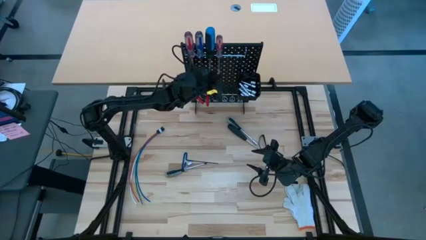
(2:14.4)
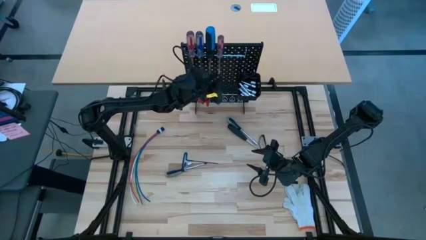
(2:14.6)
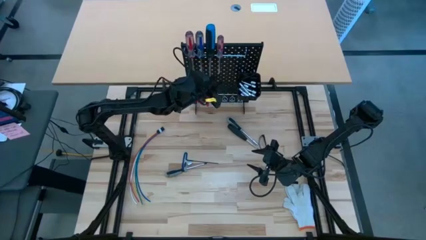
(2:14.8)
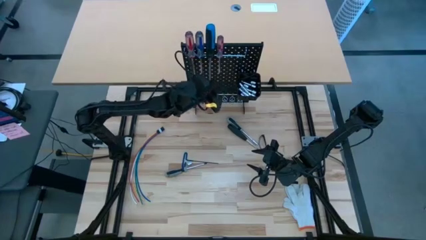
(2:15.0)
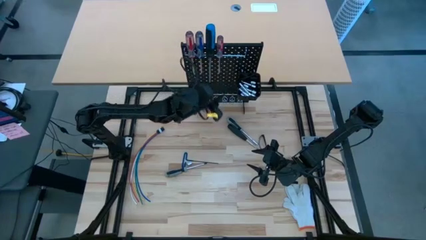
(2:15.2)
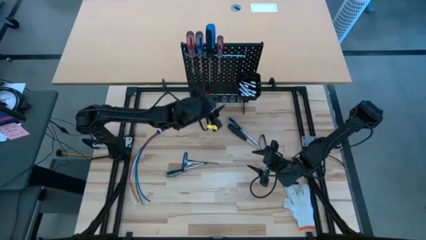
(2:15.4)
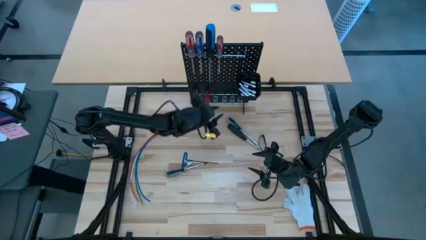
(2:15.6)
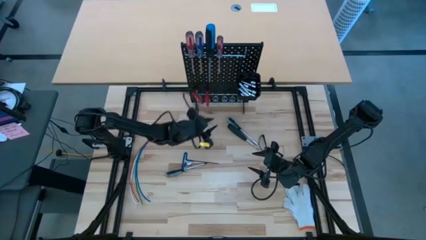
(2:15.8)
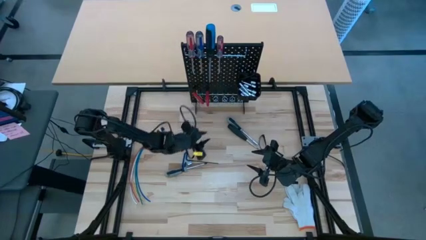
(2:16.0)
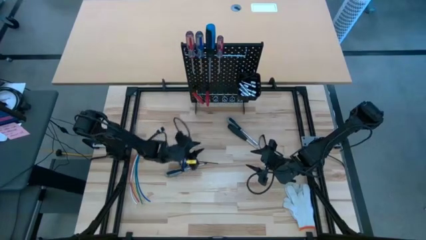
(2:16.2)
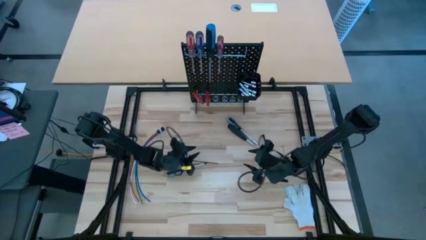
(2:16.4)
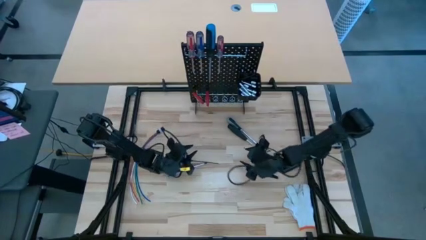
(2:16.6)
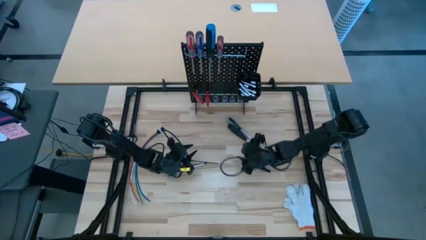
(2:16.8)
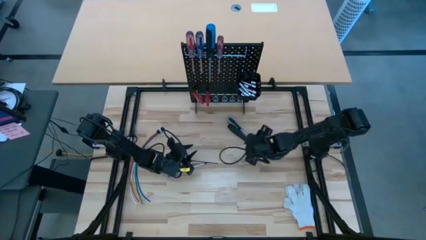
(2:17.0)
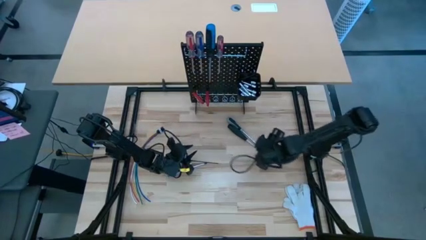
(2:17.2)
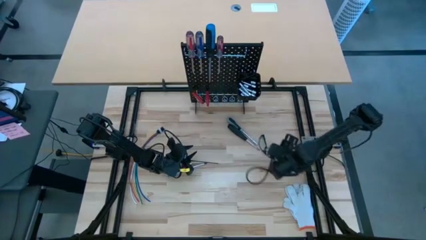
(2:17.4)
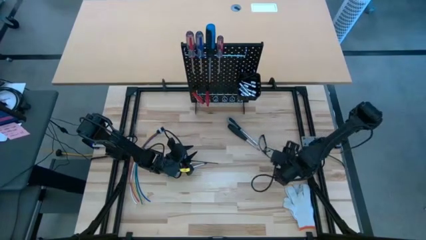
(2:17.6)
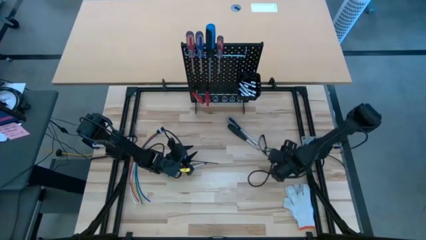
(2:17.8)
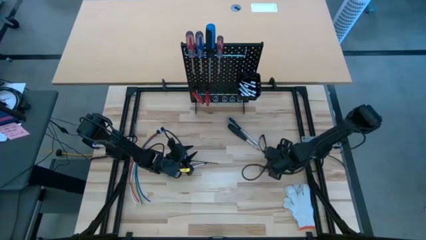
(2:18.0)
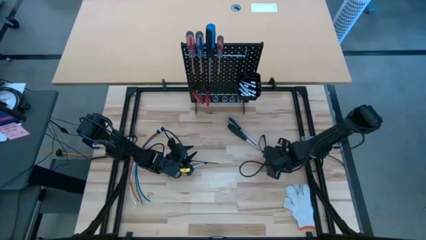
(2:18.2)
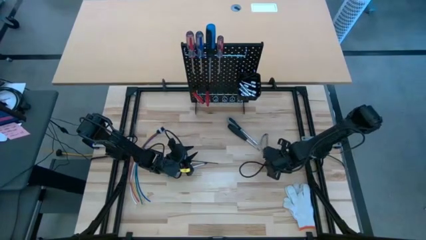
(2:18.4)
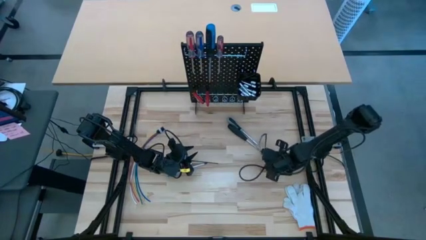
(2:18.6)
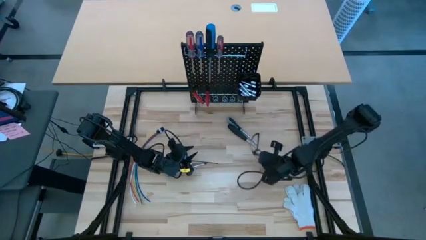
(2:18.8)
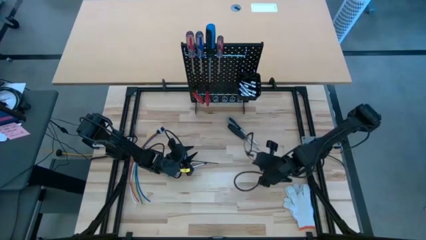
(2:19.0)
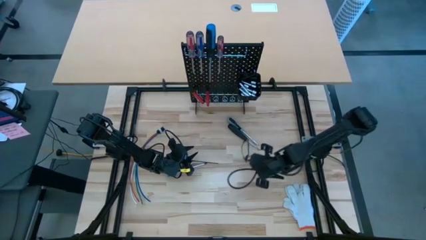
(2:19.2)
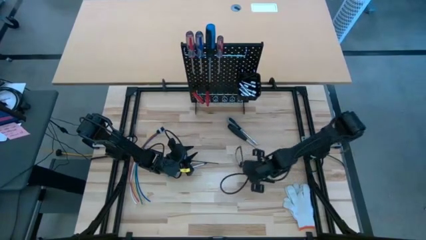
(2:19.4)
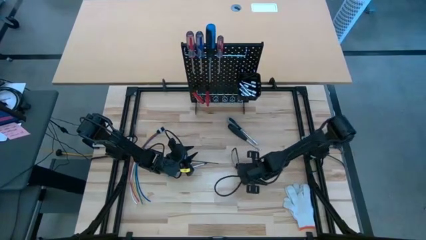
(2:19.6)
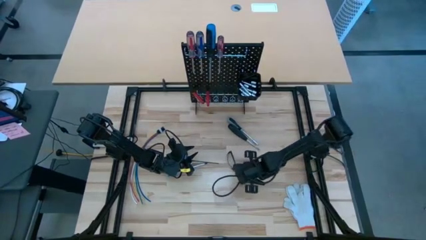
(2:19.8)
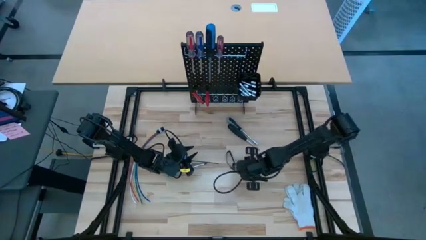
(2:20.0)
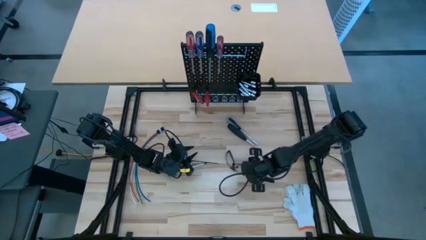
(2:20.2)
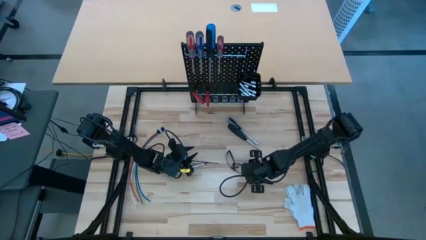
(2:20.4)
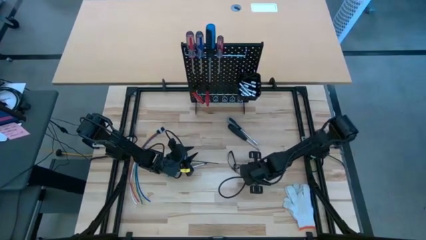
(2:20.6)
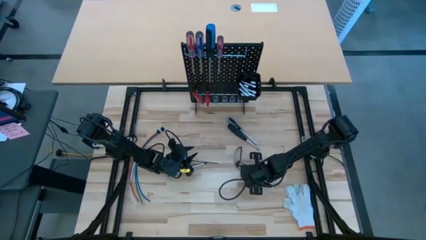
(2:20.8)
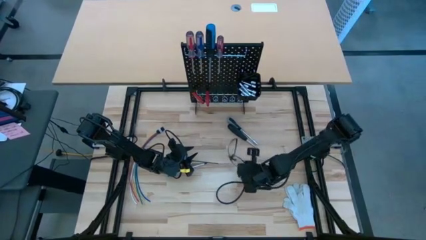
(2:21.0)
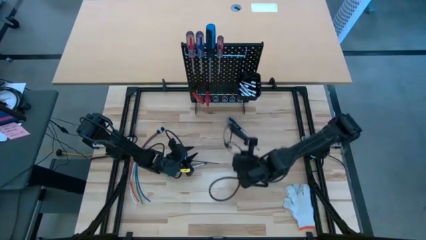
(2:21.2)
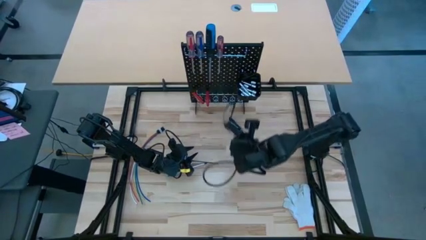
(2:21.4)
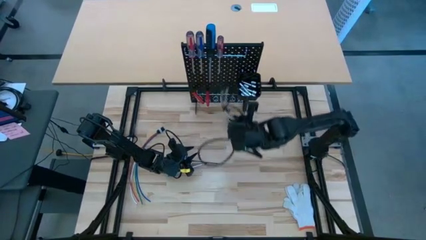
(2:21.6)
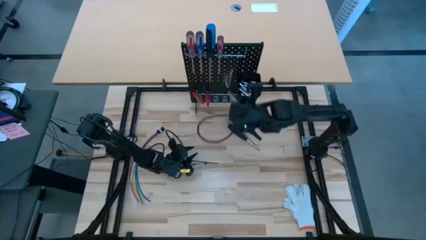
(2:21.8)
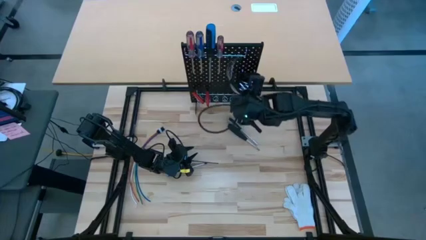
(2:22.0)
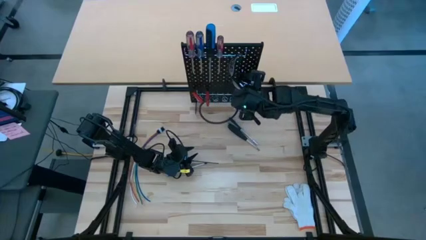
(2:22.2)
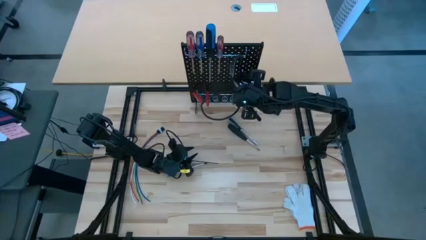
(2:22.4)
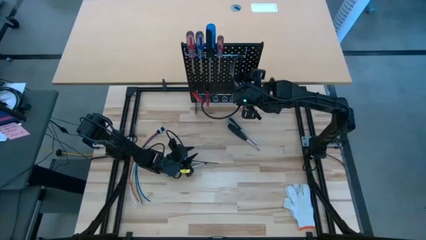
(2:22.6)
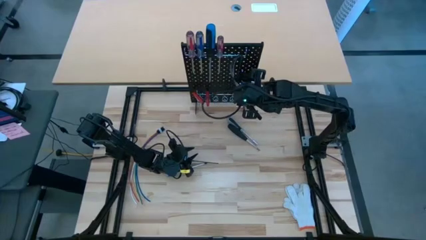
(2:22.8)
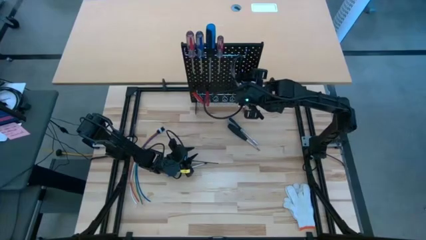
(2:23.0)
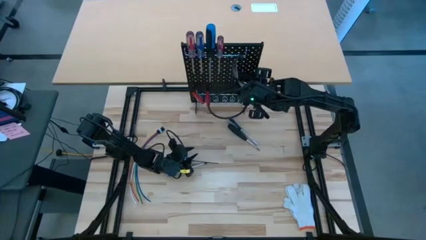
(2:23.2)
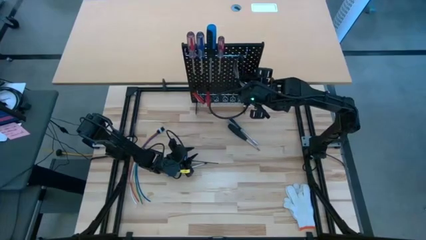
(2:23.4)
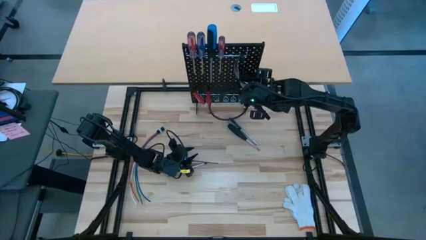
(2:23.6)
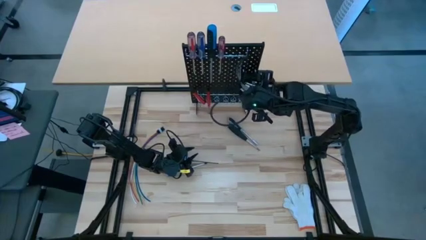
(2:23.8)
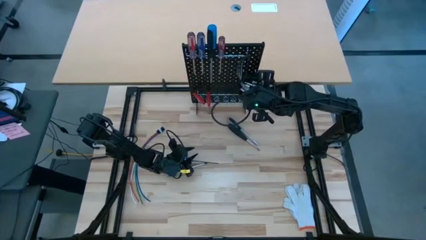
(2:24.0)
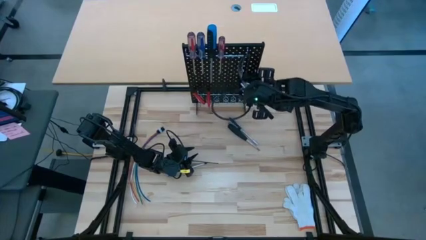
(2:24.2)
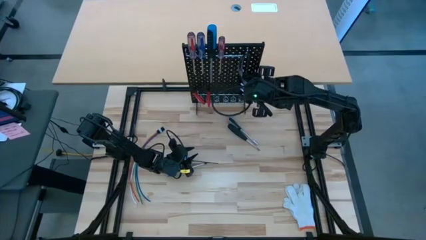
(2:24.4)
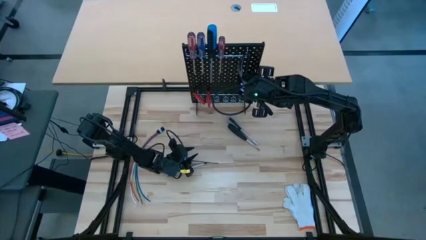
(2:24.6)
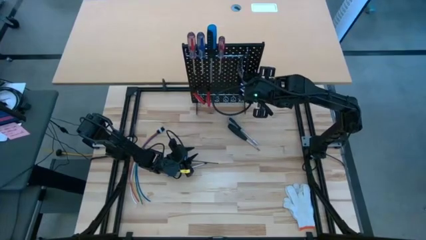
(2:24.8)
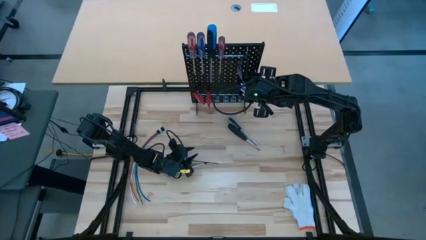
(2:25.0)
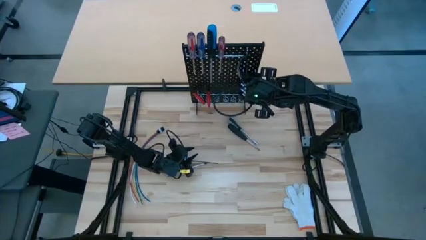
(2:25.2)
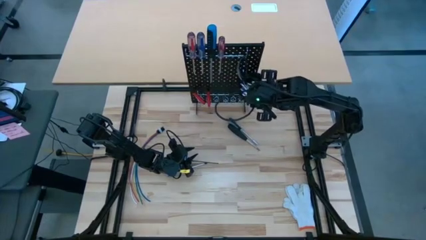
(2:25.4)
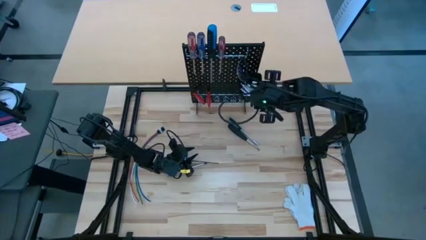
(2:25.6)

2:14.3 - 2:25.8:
Task: Hang tools onto peg board
Hang the safety glasses on the pegboard

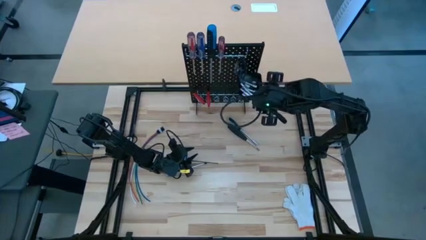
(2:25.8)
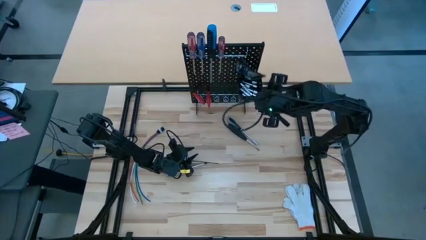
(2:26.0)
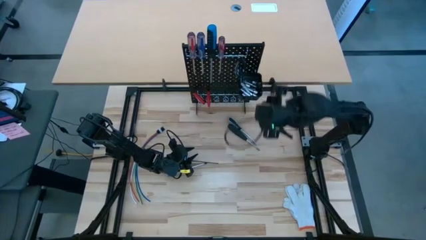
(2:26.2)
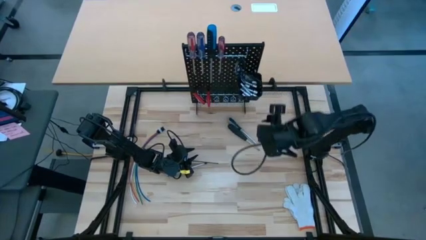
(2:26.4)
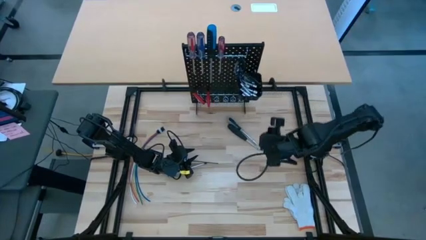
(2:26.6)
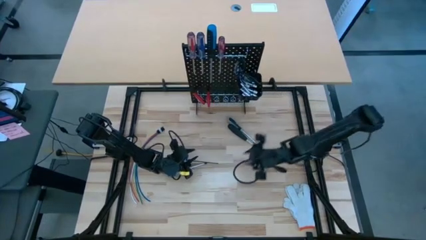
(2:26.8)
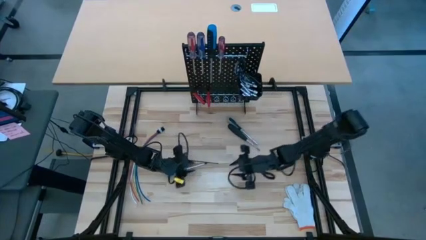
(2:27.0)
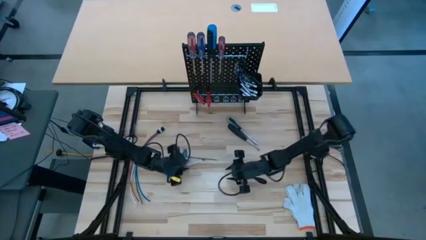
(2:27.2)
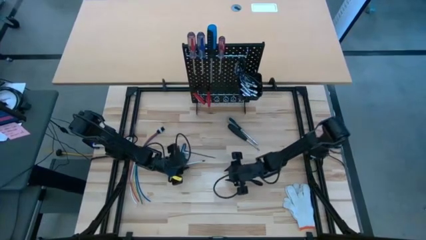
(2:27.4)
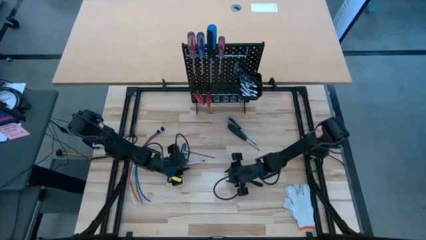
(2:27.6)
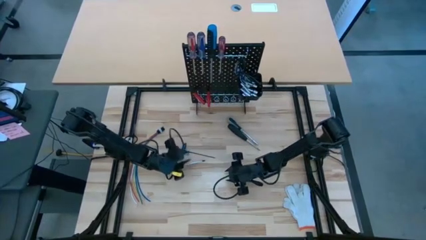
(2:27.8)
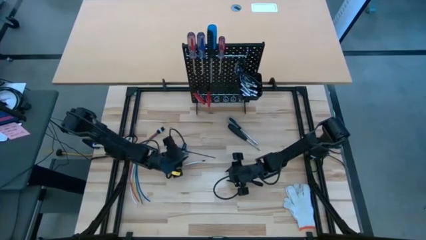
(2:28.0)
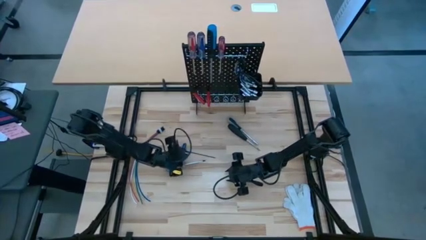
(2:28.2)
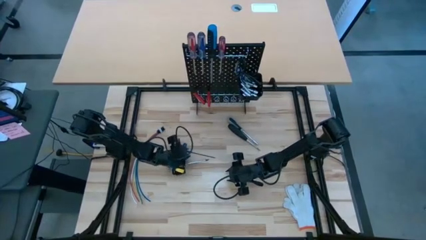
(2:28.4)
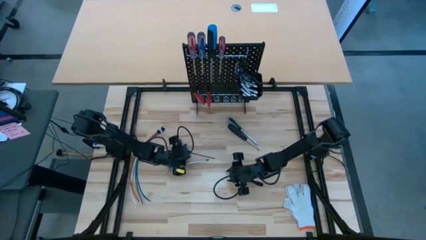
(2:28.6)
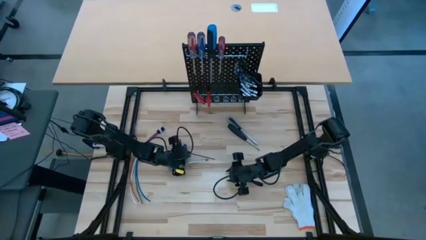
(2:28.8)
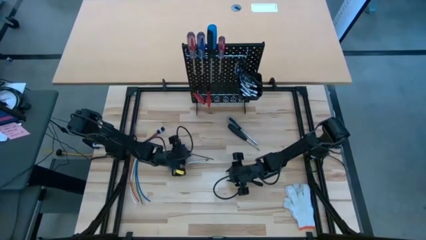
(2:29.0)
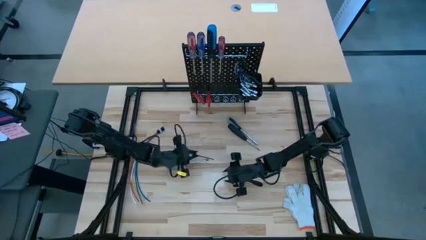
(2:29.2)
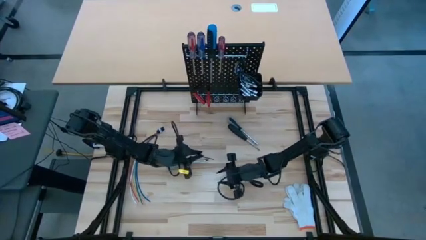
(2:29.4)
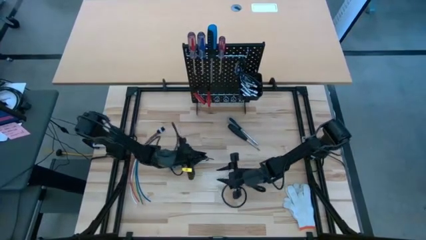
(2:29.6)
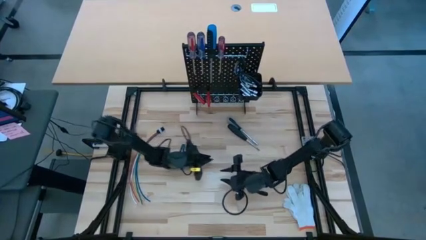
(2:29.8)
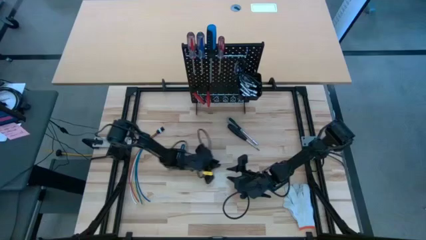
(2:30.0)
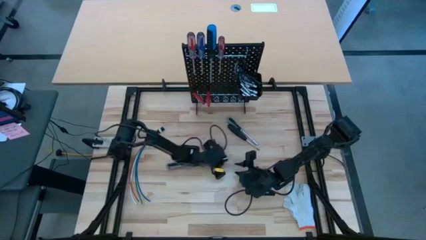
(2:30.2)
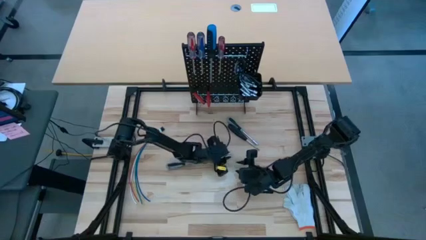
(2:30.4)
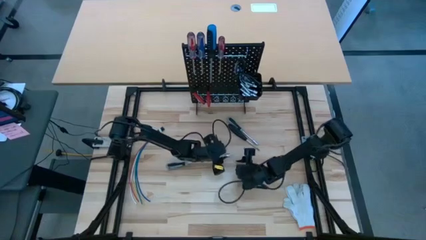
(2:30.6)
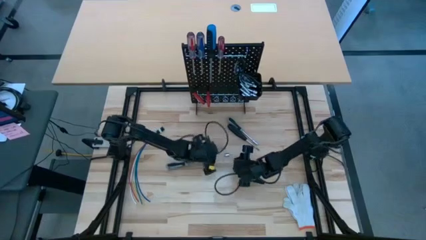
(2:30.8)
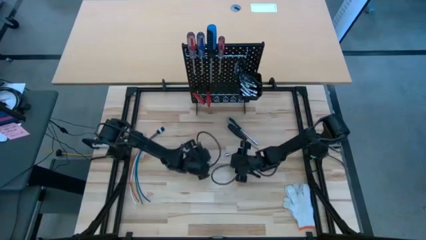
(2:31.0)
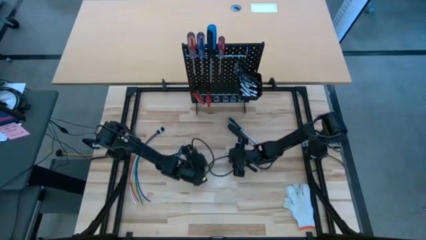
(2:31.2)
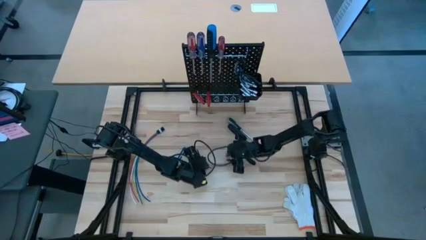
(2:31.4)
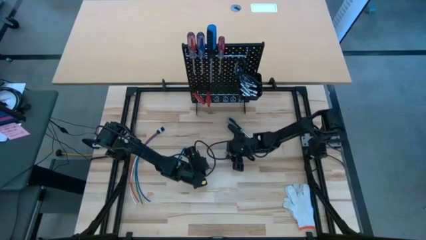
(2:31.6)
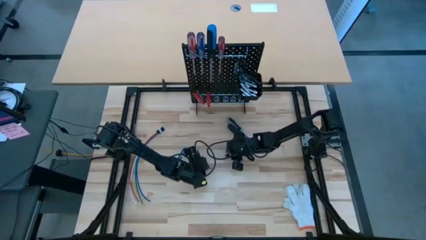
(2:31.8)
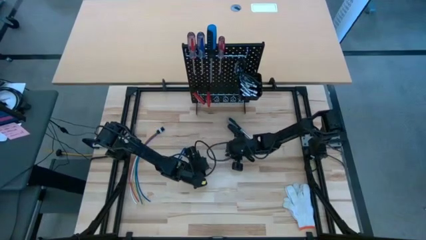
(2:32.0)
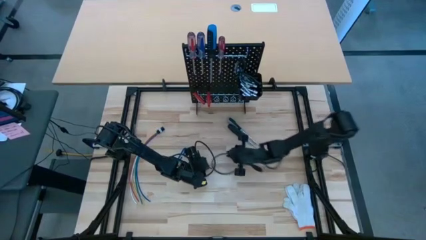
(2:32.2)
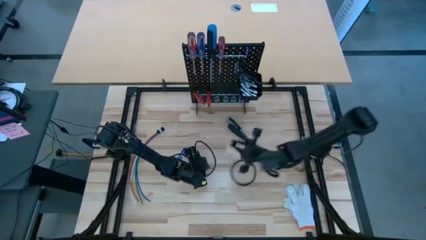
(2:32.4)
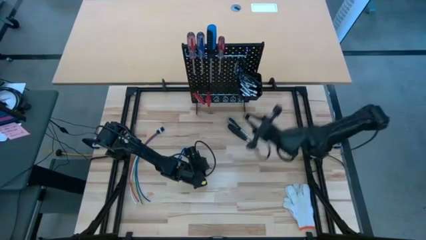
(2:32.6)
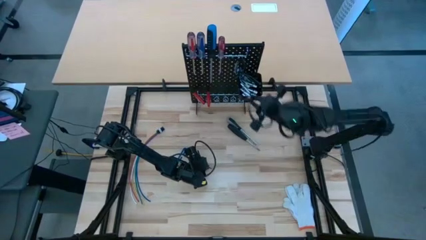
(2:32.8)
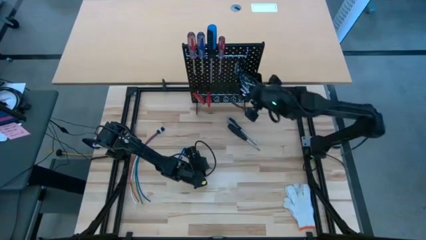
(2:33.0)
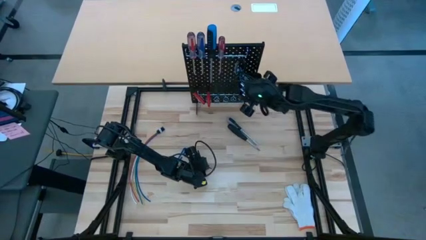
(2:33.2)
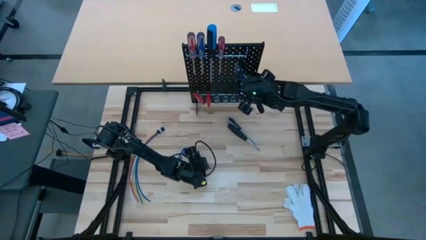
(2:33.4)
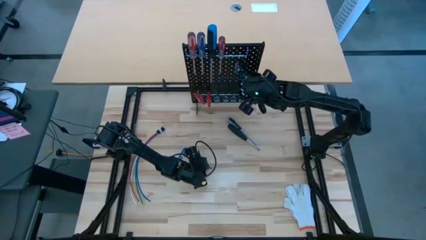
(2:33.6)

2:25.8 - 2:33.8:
Put the socket into the bin of the pegboard
